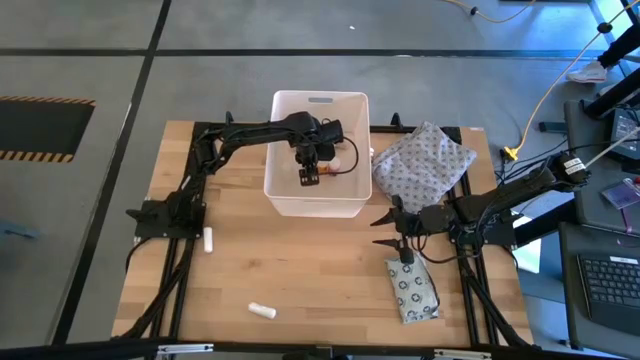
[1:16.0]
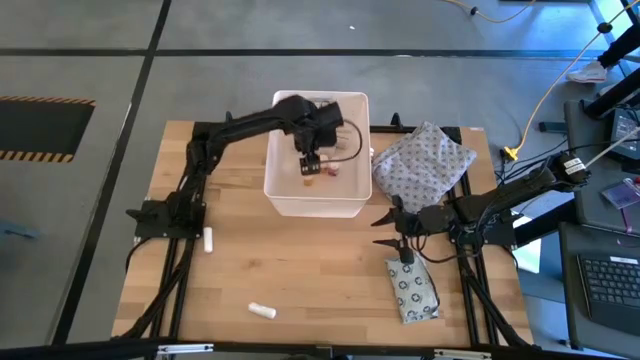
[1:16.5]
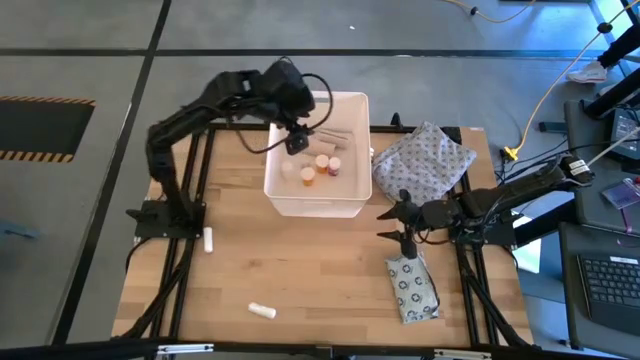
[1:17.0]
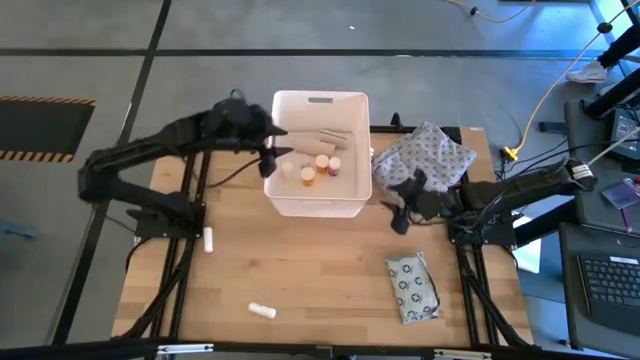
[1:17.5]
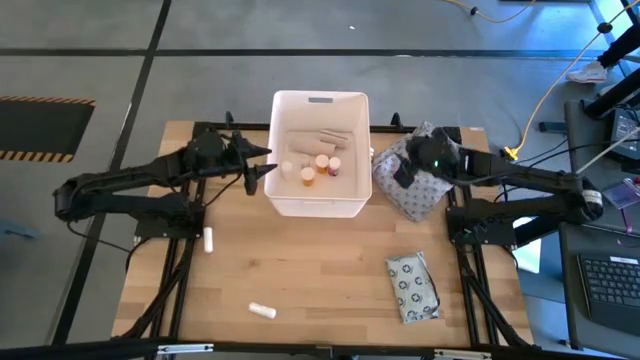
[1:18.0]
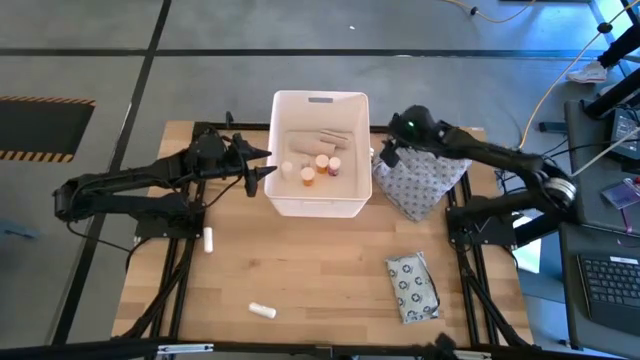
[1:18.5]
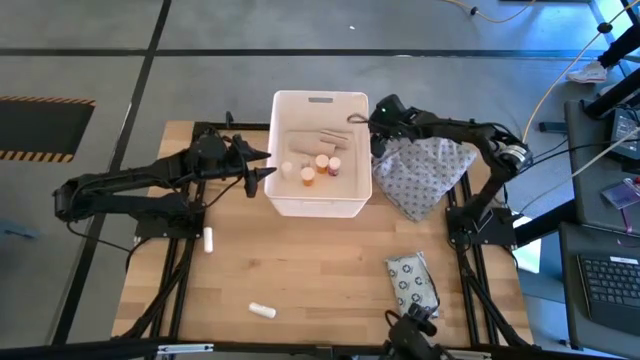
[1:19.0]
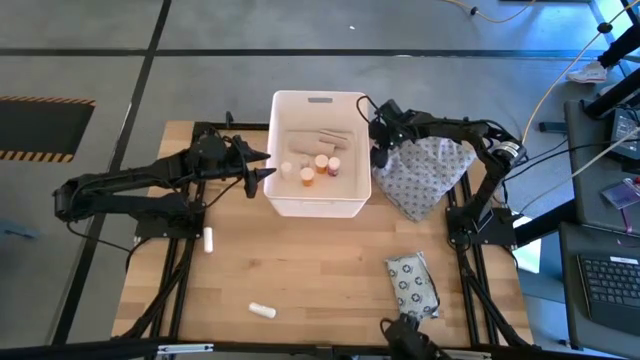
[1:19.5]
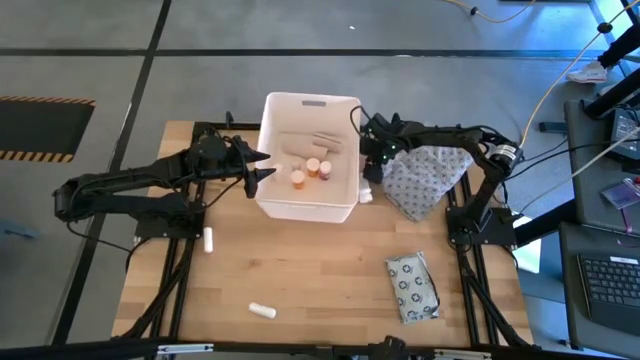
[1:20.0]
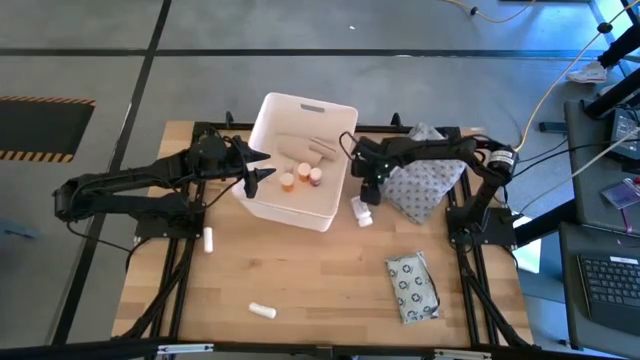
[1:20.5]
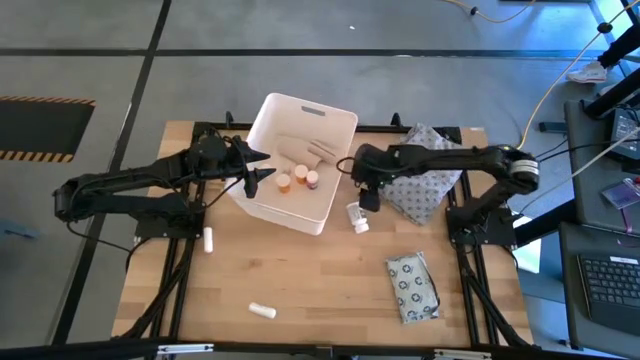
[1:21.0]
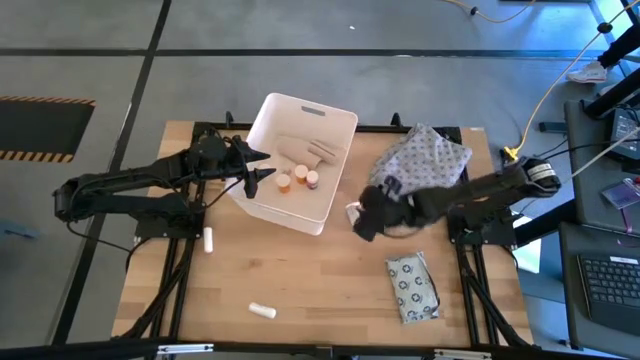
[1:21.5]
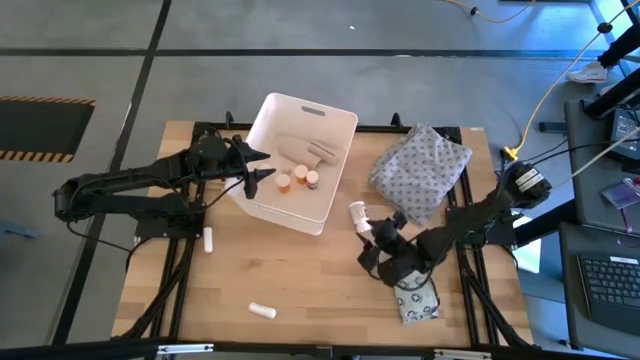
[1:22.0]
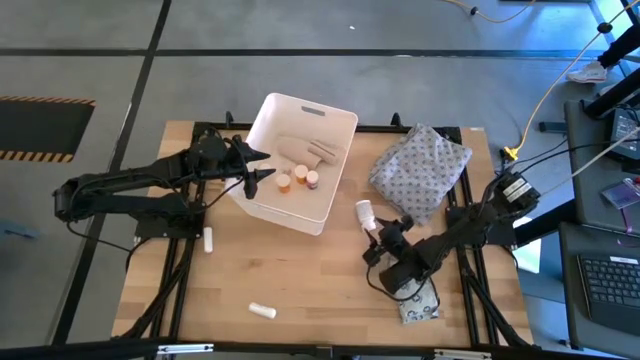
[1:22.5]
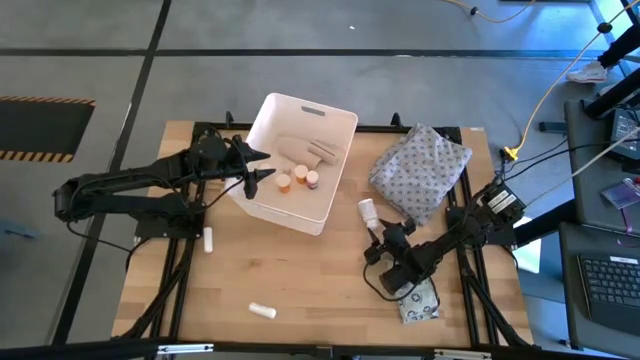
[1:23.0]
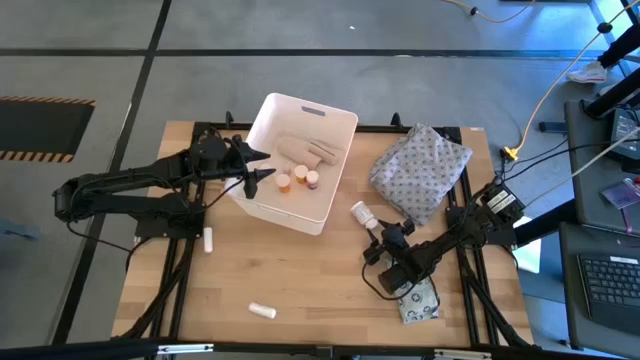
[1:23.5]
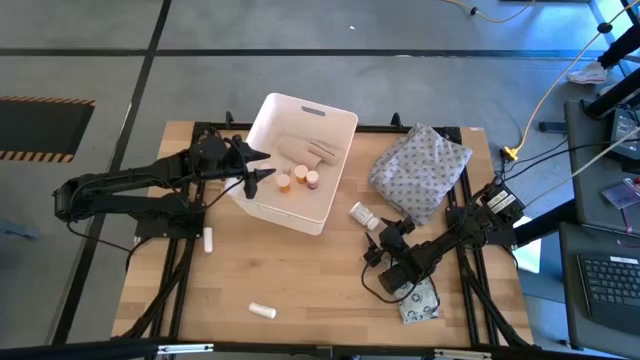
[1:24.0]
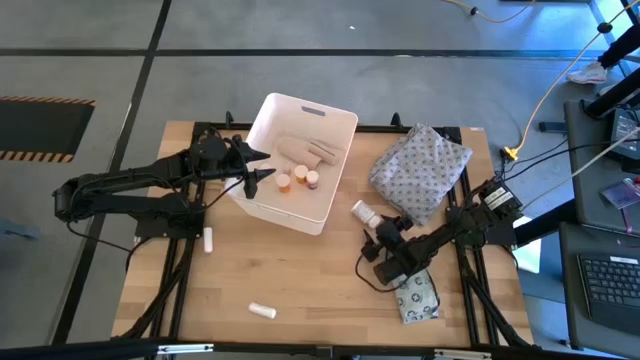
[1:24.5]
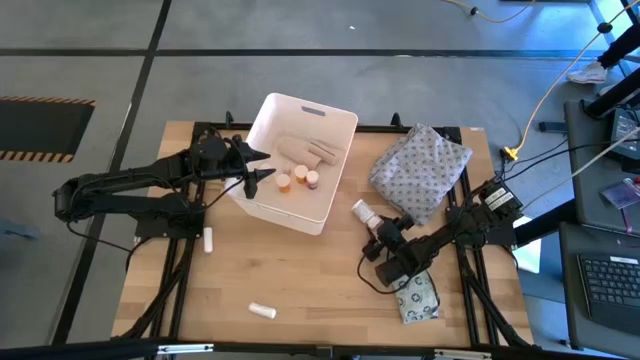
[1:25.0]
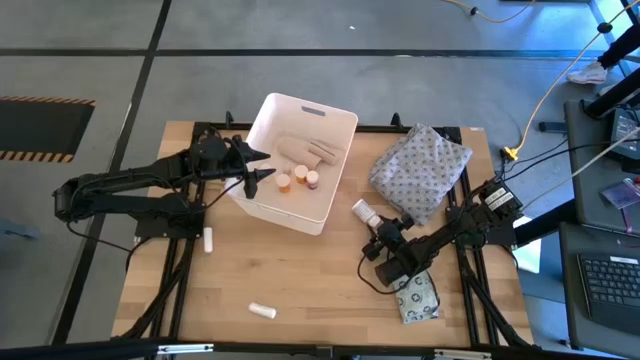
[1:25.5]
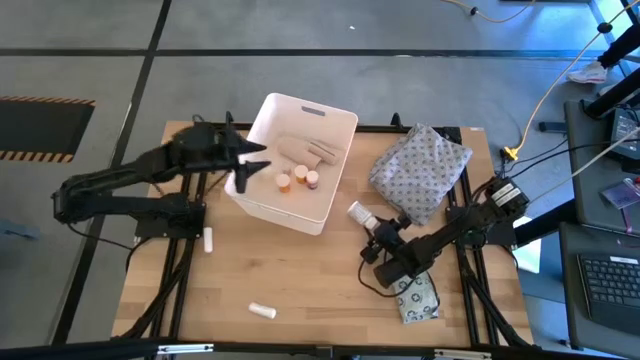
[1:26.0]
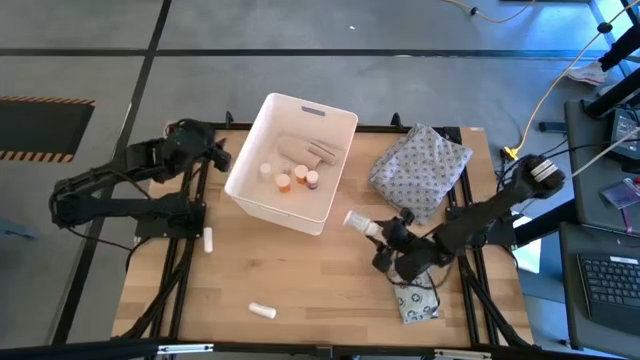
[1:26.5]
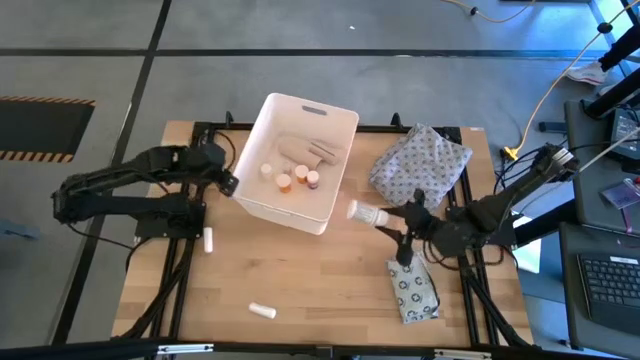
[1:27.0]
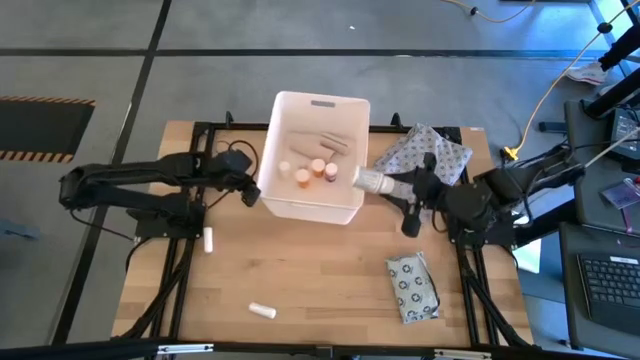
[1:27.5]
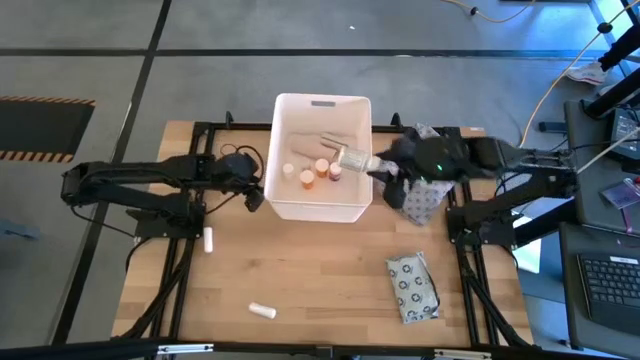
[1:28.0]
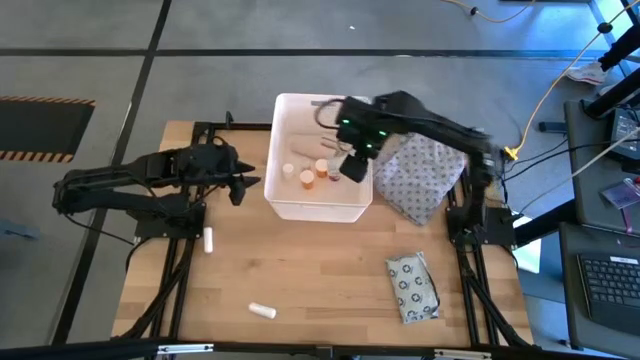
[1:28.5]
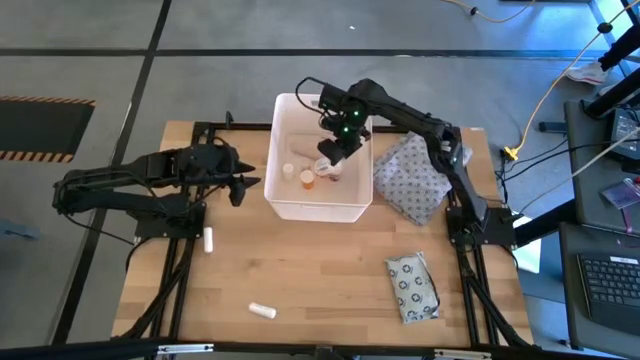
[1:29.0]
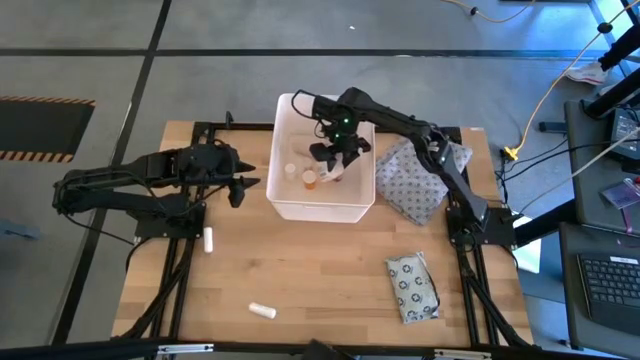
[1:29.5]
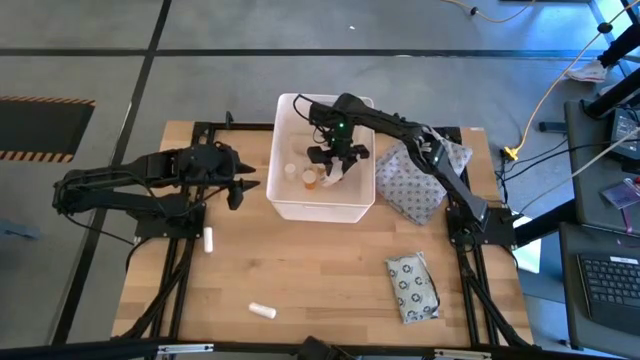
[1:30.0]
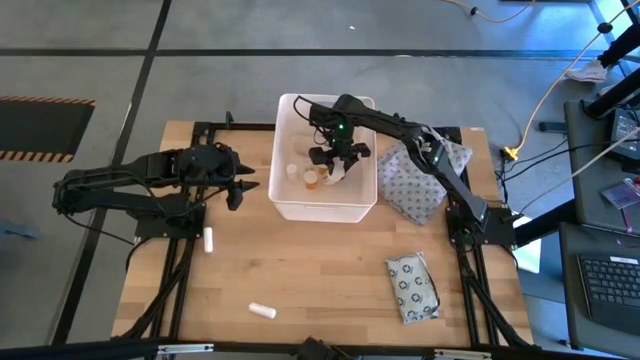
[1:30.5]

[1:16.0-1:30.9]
Task: Pick & place medical supplies in basket/bin
Put the white pill bottle into the white bin

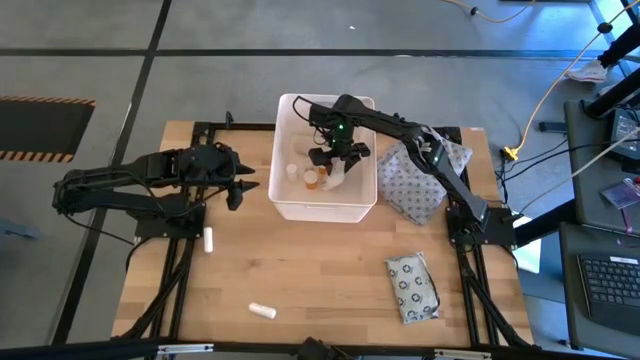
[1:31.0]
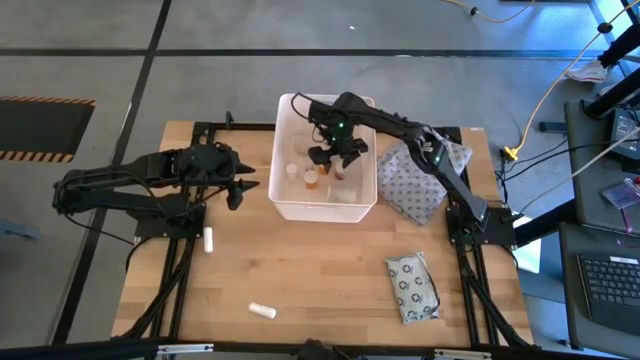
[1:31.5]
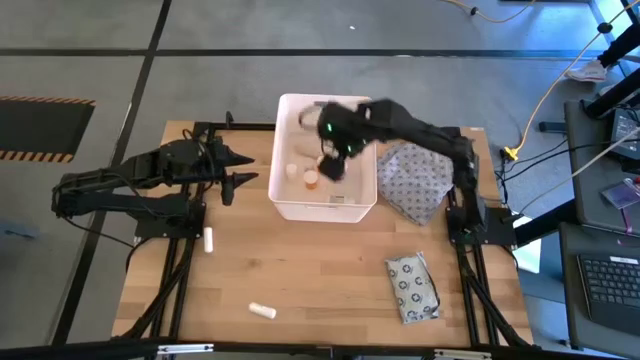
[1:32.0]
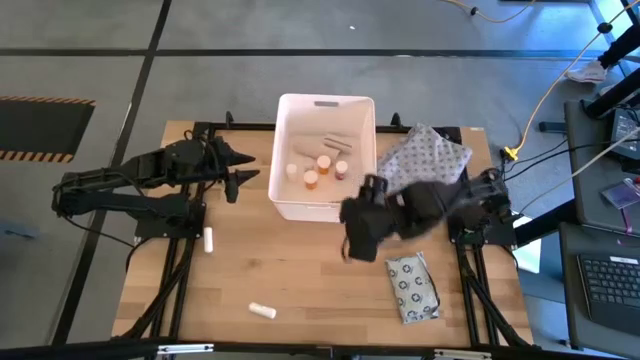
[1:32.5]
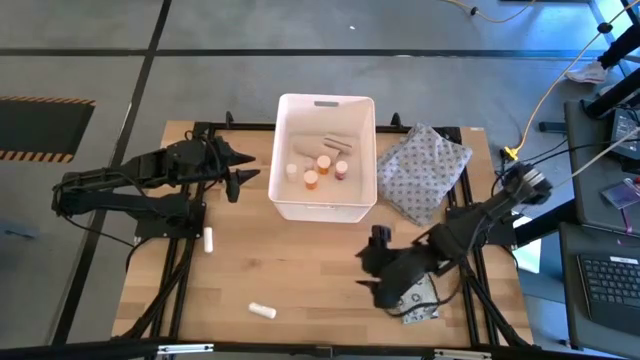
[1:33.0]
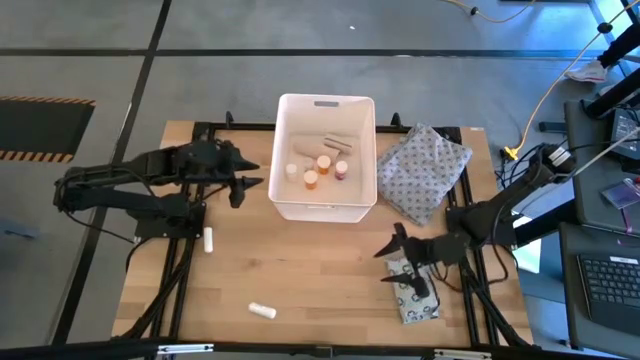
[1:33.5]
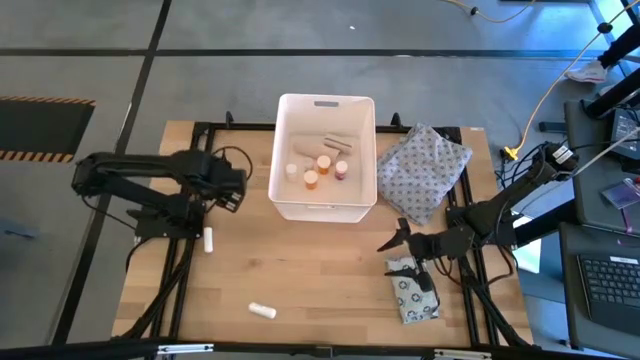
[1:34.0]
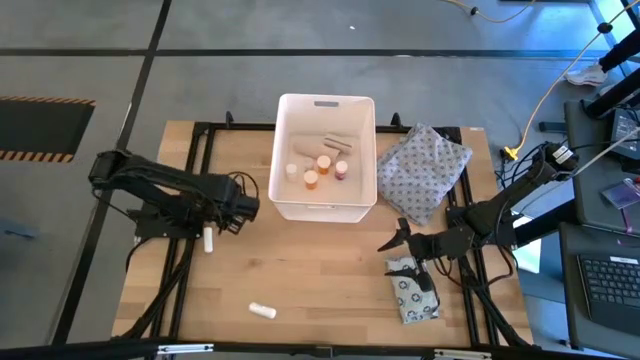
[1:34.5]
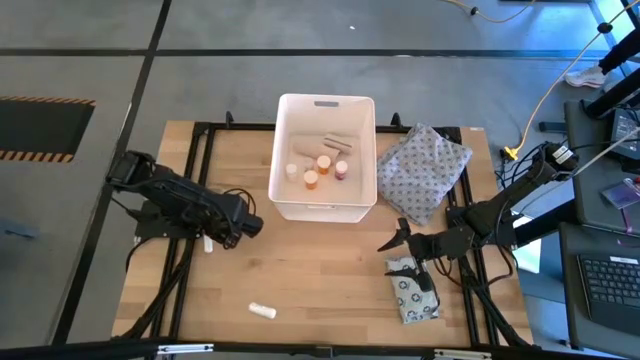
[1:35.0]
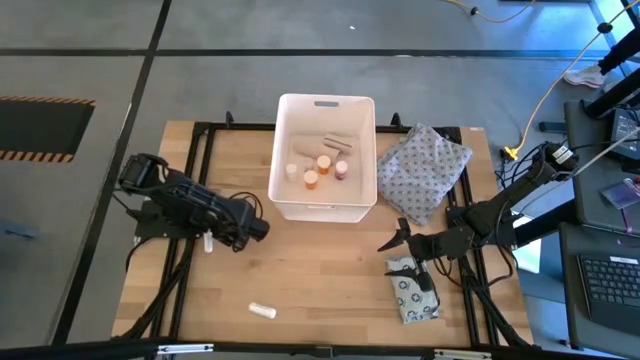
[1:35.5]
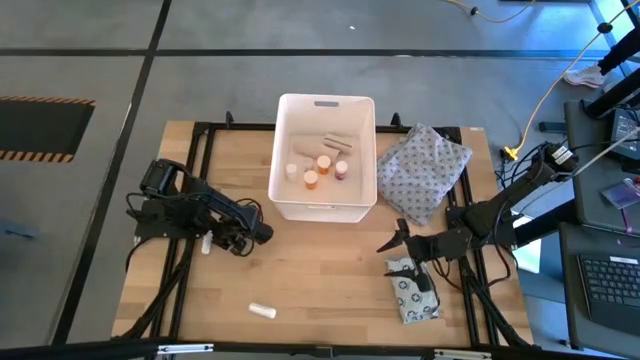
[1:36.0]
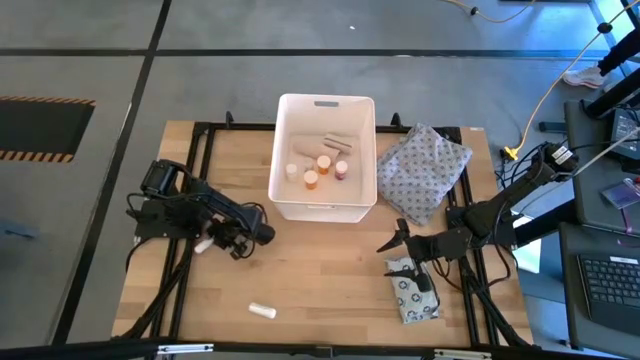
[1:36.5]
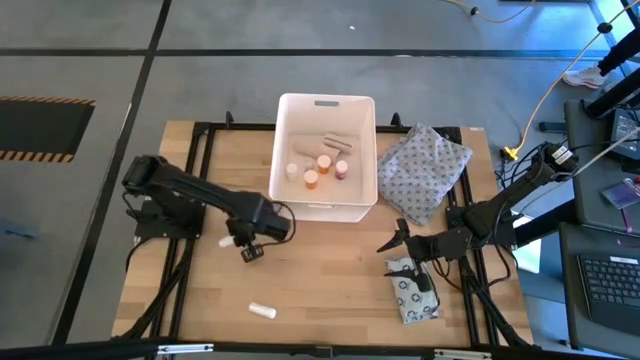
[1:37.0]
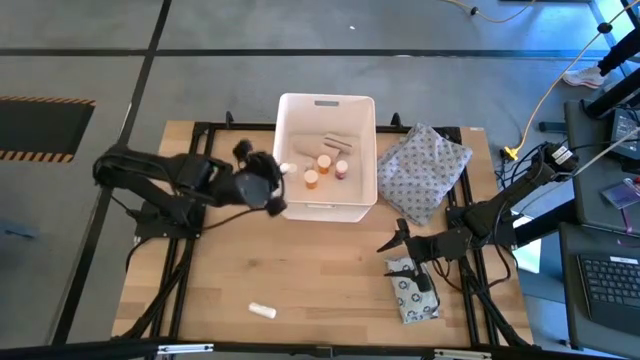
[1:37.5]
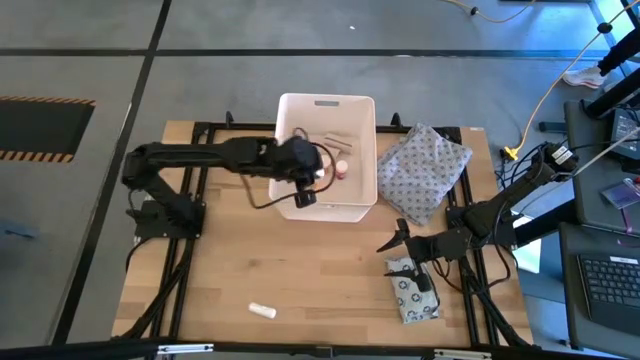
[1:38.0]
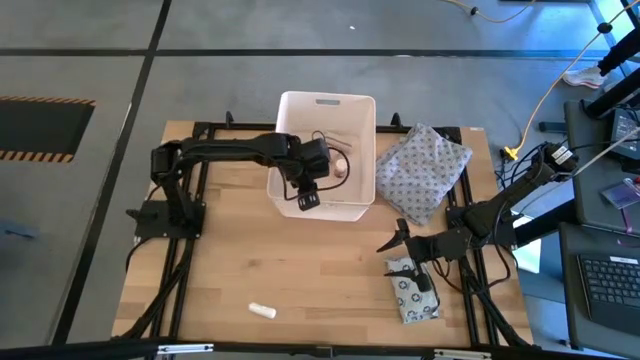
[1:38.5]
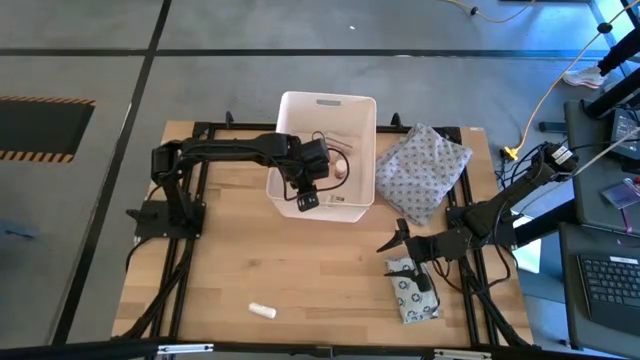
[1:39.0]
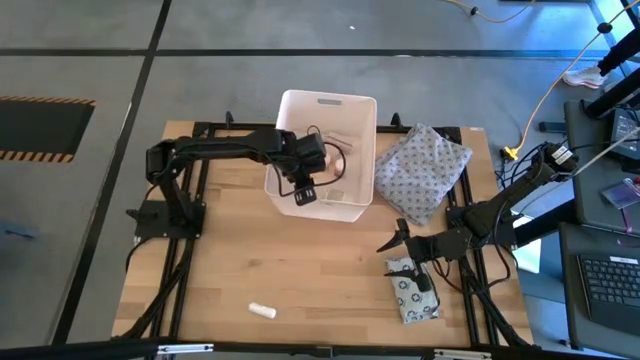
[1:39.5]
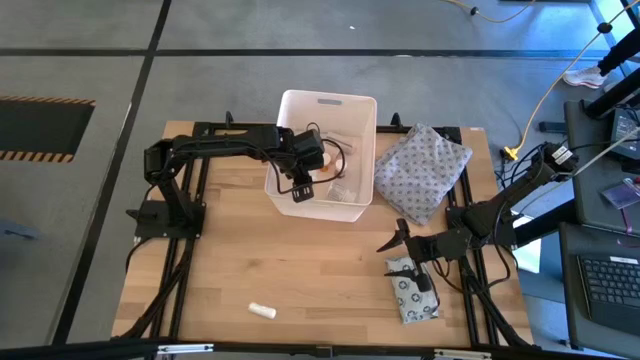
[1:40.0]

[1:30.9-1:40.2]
Put the top white rolled gauze into the white bin
